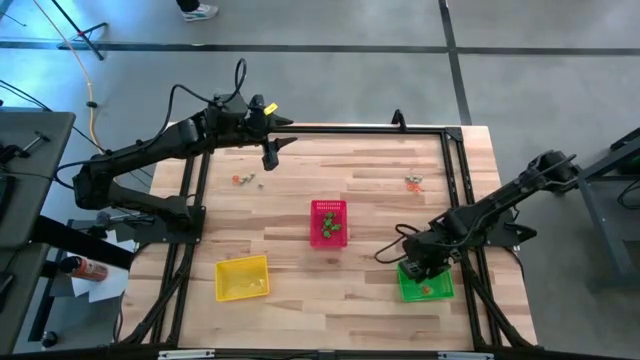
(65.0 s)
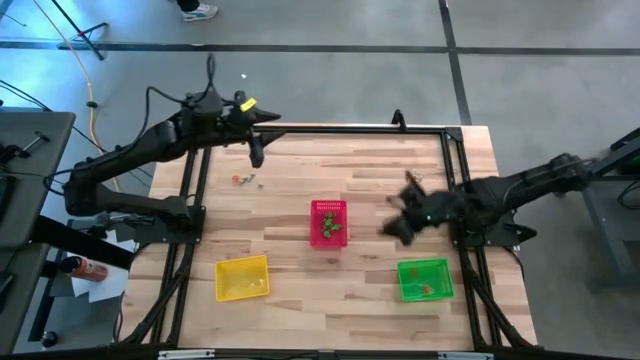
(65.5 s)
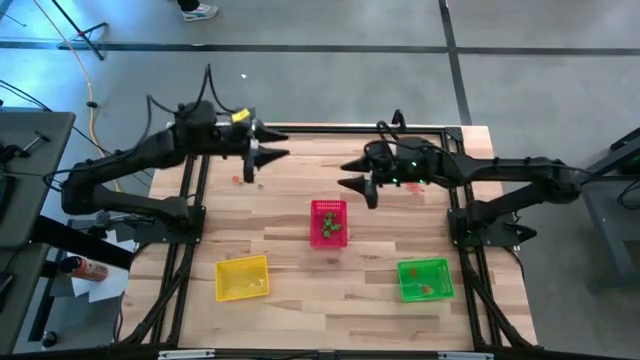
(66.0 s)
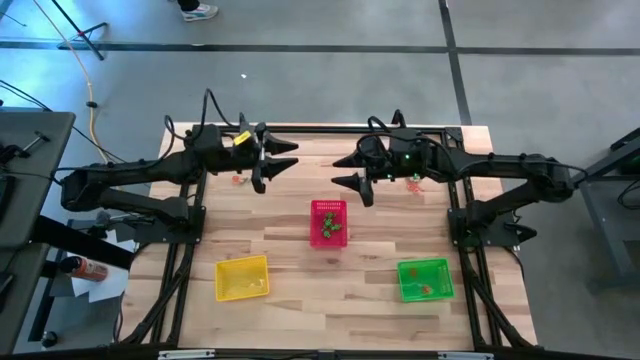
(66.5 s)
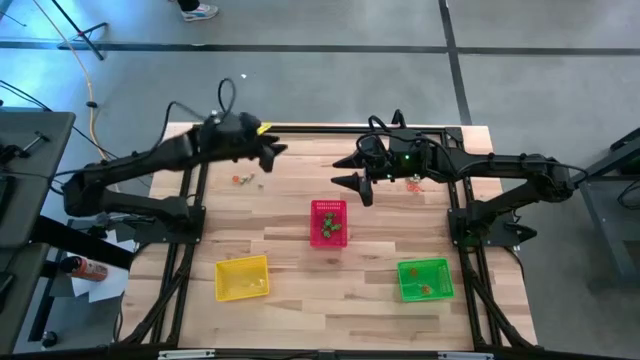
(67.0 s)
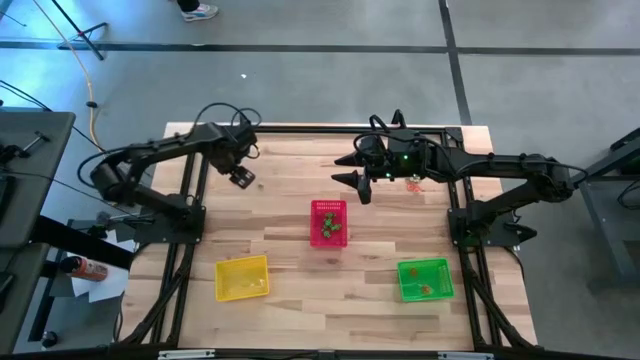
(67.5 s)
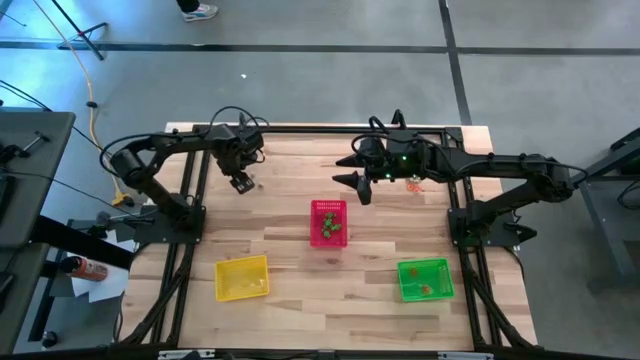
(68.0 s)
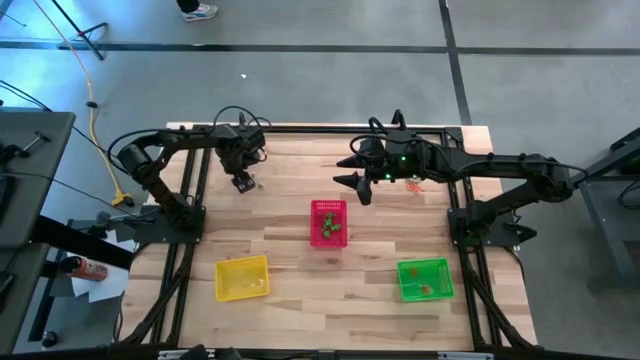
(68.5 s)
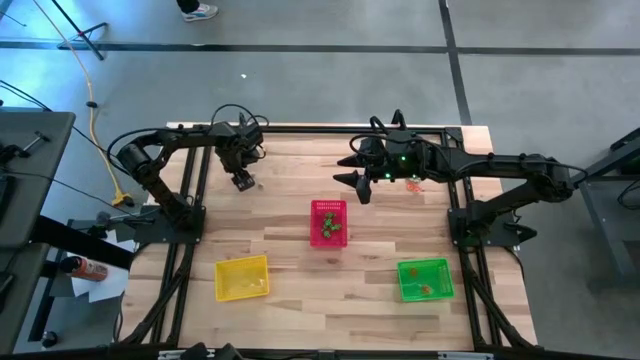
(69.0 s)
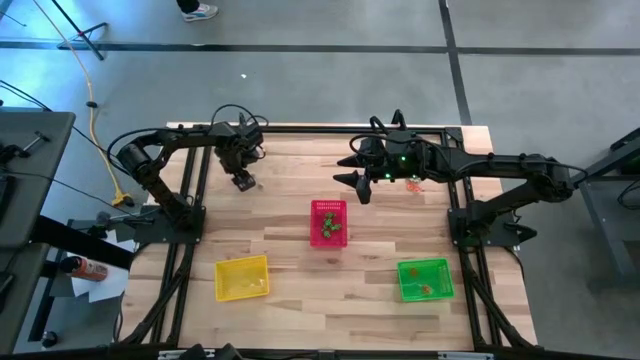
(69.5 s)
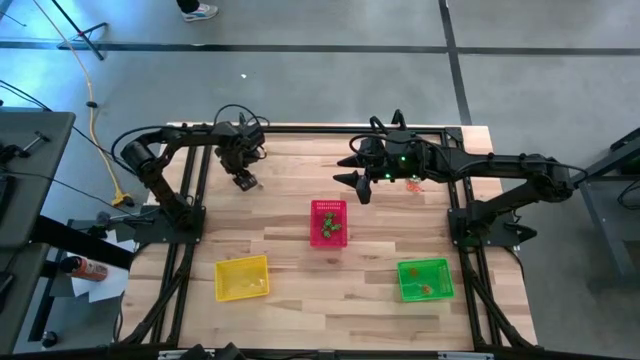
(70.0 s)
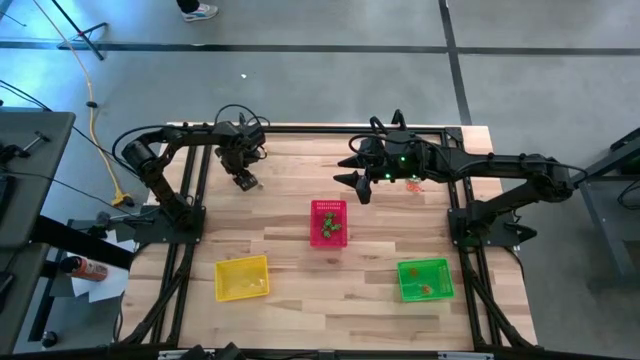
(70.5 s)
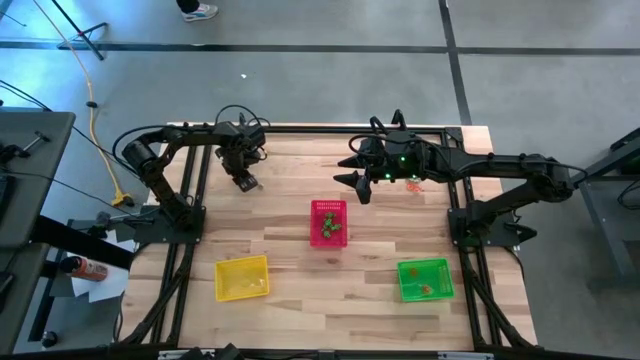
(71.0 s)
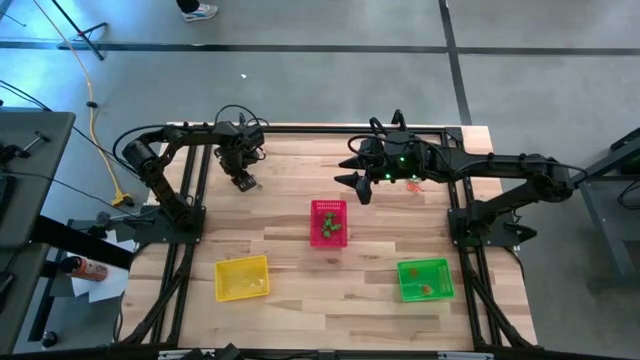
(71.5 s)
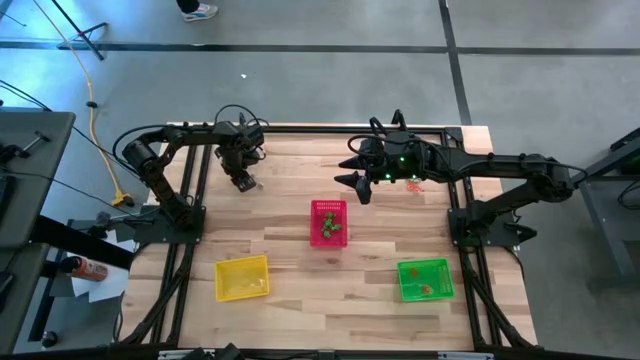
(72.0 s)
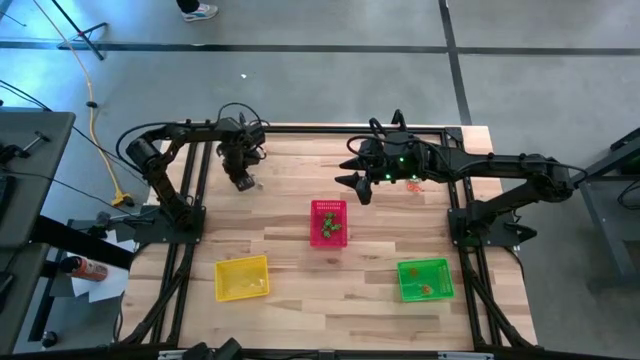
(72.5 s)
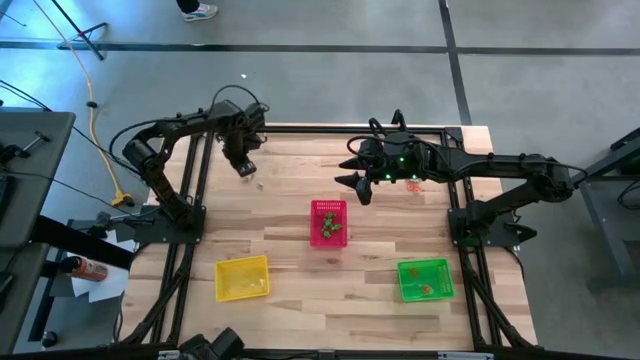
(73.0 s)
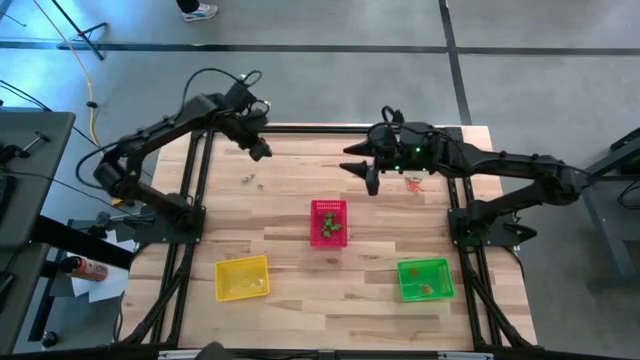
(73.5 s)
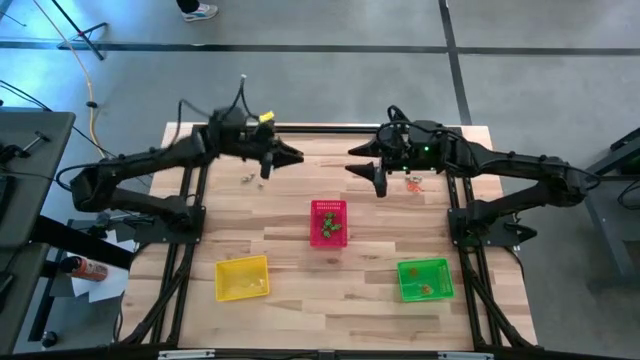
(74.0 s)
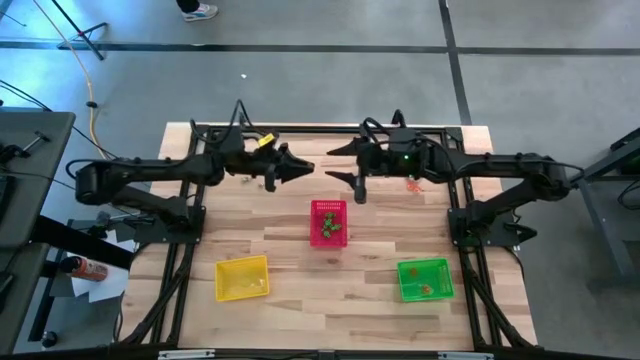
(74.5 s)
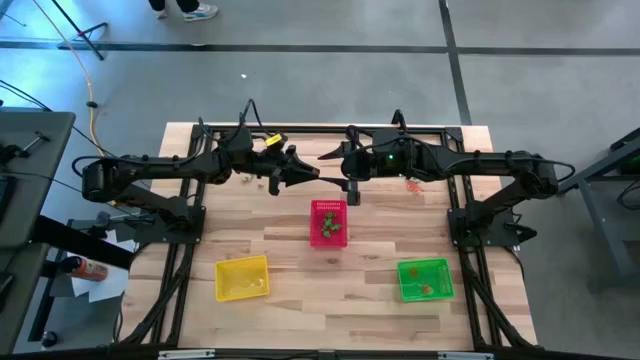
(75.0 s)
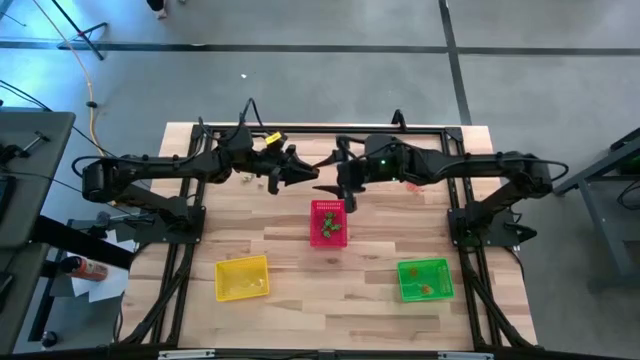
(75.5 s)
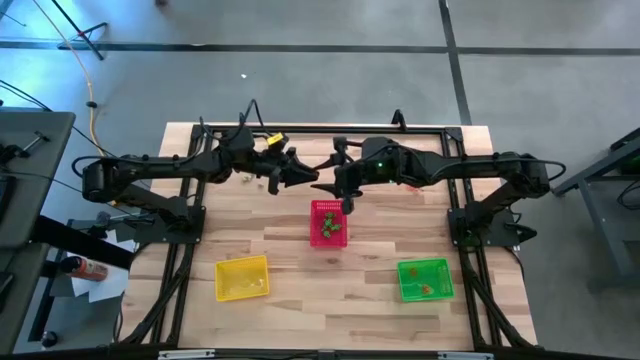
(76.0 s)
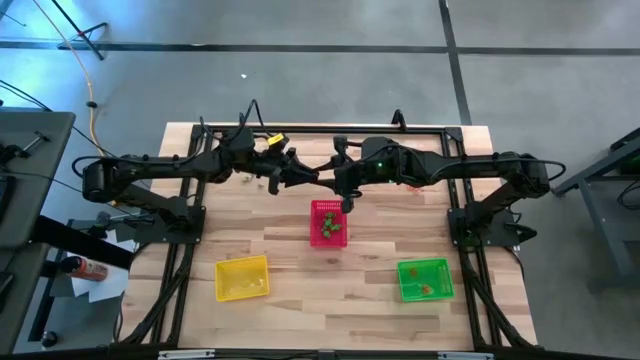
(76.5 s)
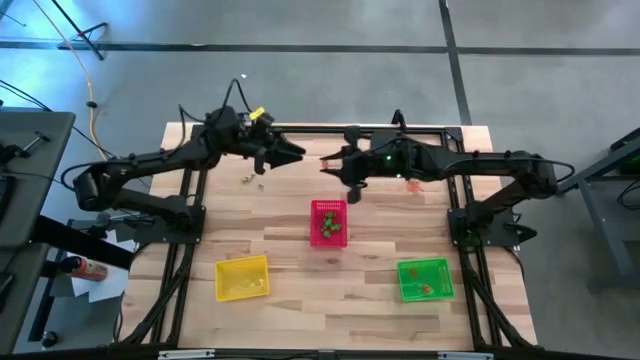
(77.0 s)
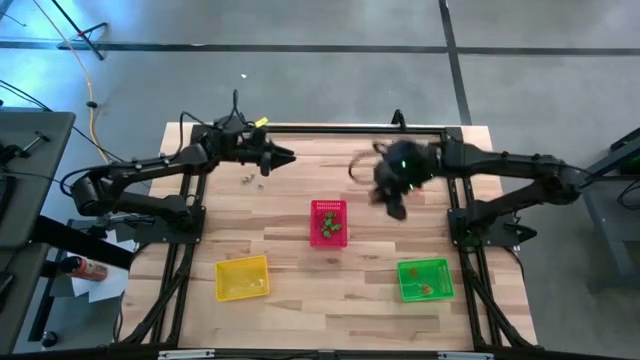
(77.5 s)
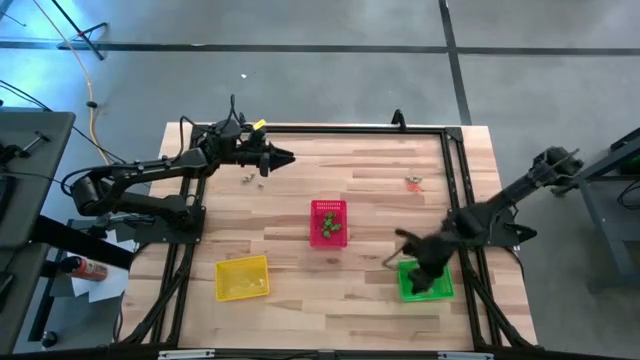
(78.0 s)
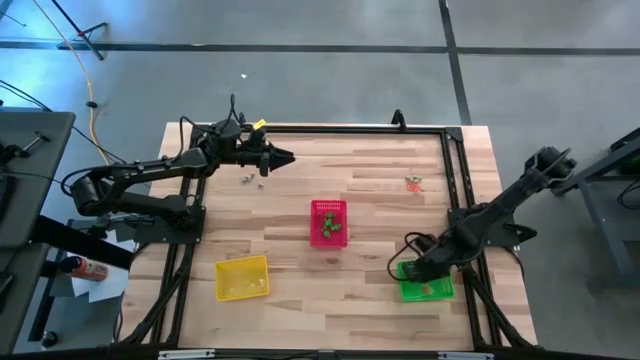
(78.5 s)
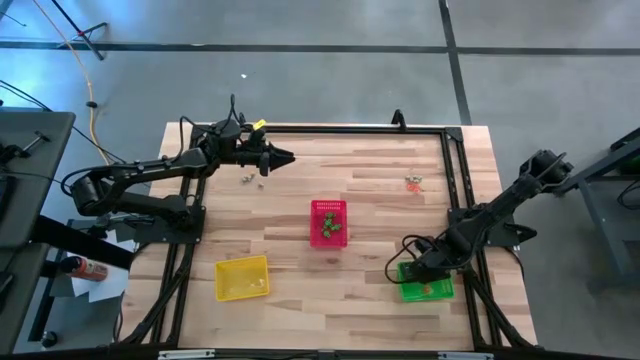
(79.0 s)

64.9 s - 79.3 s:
Task: Sort Halloween decoration
Put the orange pumpkin toy into the green bin

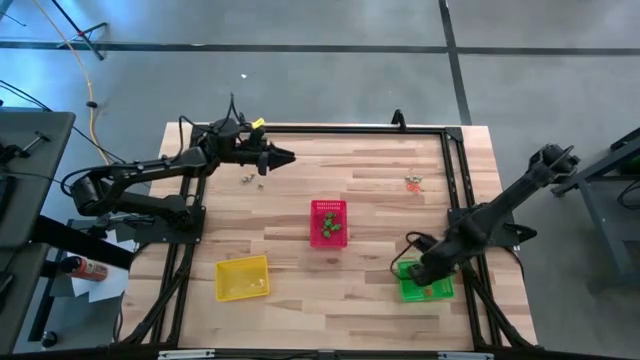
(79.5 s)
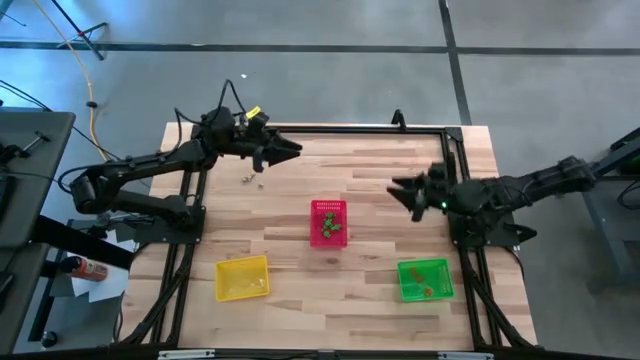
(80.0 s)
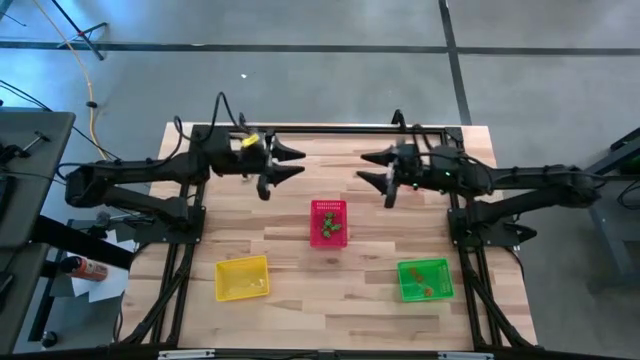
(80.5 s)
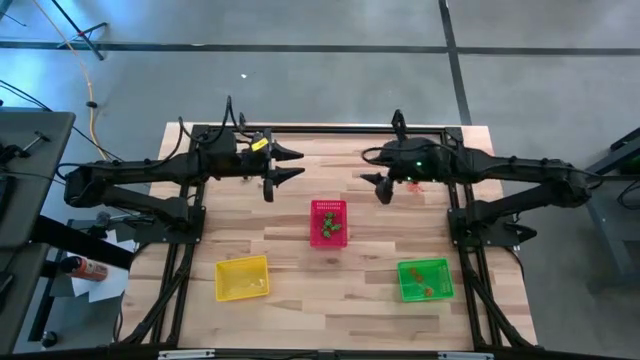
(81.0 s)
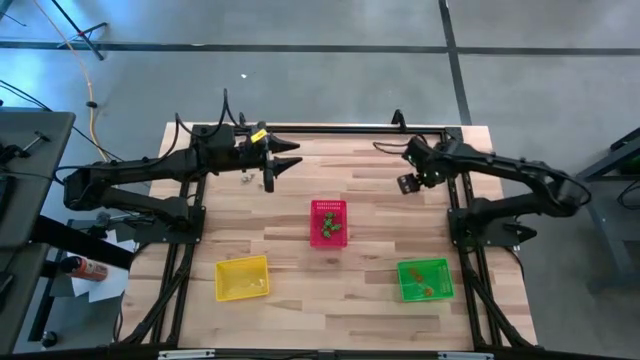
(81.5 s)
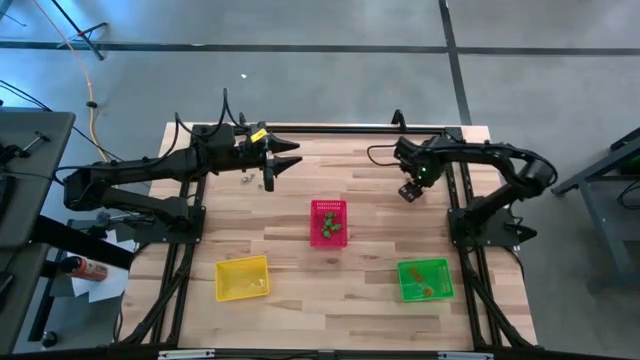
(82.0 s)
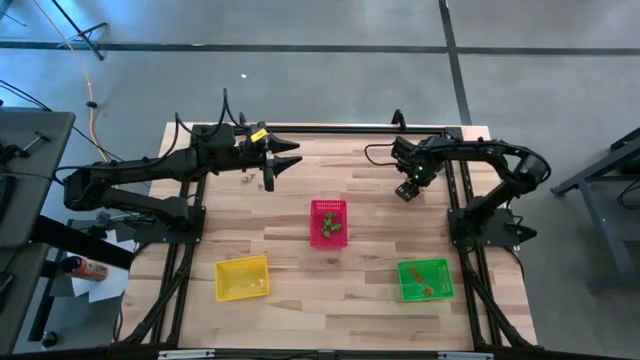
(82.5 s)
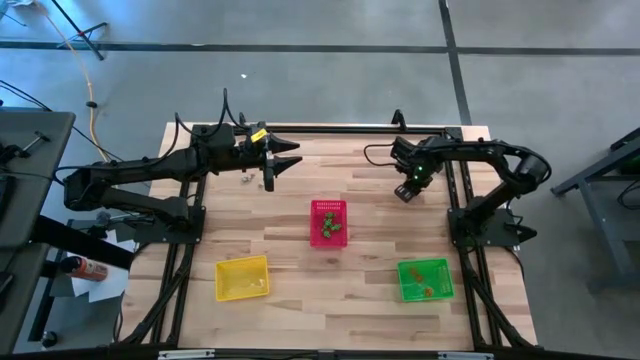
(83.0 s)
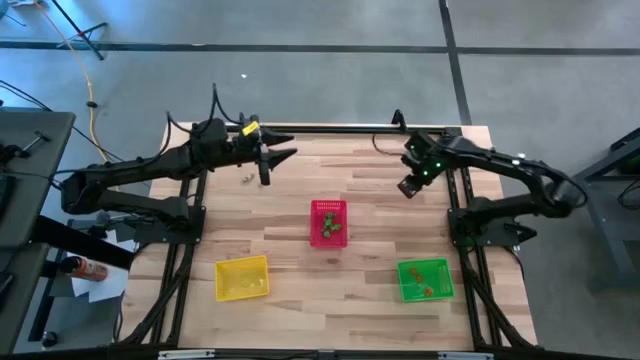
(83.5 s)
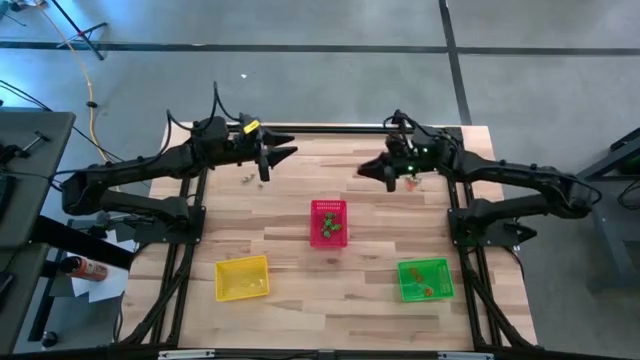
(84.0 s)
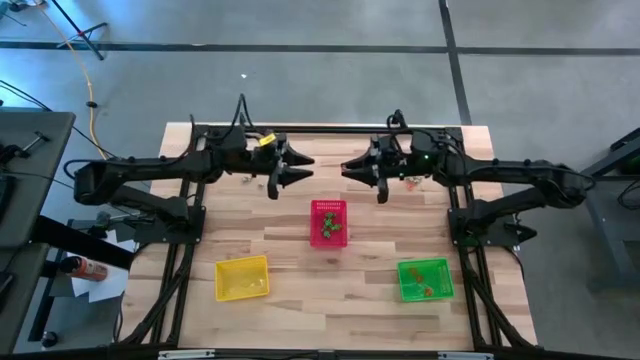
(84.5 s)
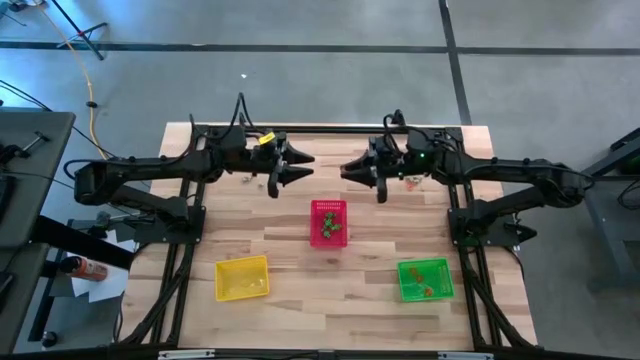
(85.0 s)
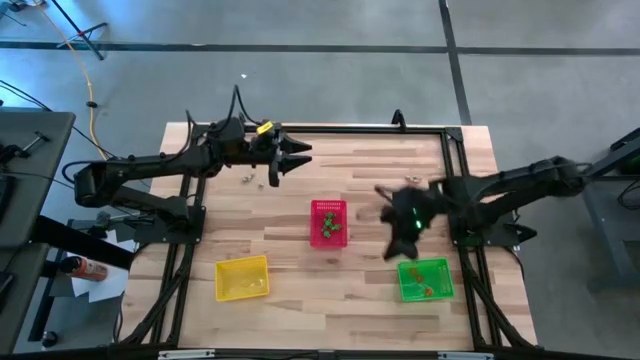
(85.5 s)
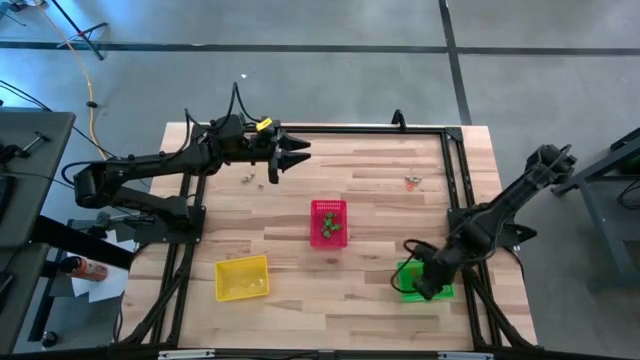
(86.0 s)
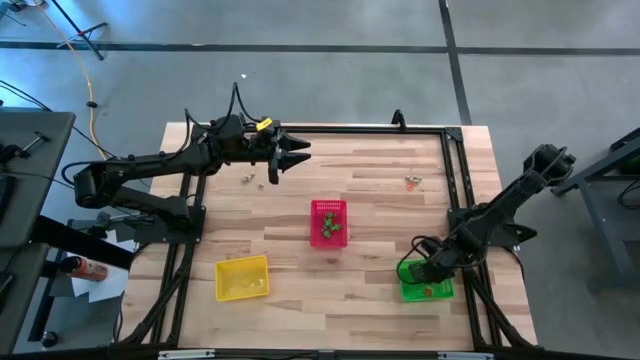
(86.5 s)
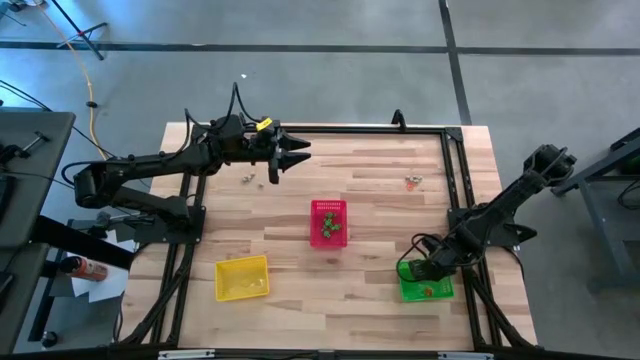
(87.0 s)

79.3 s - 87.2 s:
Put the orange pumpkin toy into the green bin
